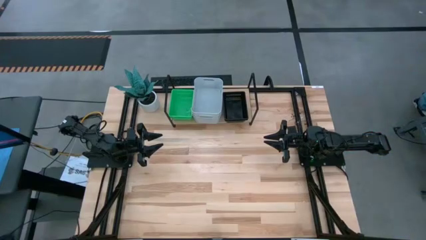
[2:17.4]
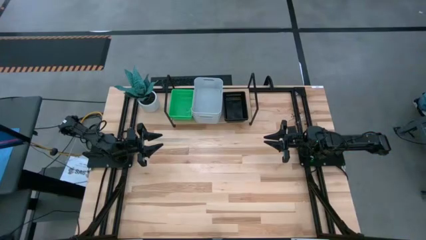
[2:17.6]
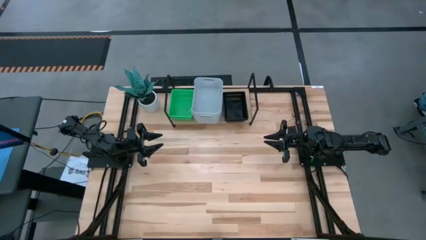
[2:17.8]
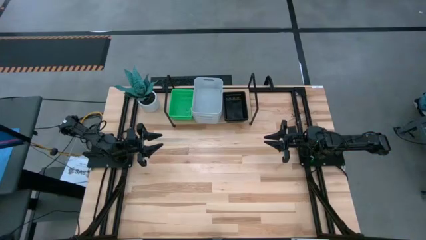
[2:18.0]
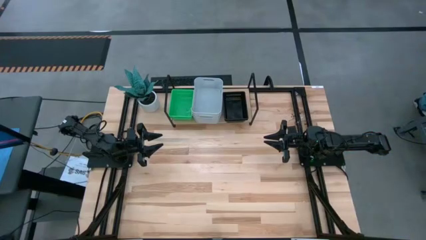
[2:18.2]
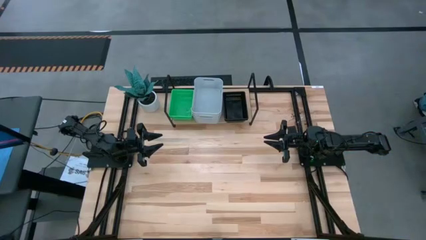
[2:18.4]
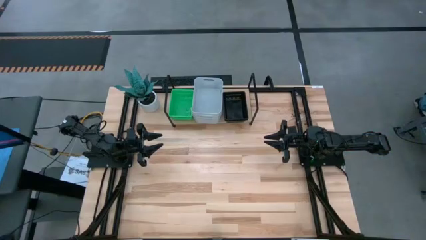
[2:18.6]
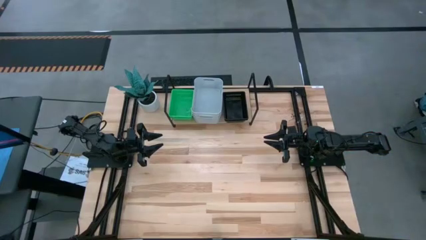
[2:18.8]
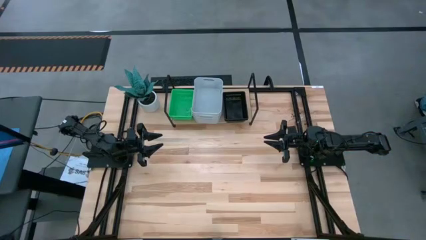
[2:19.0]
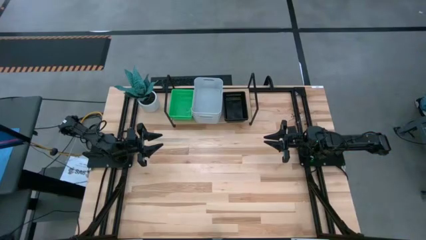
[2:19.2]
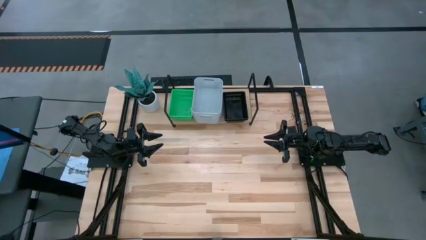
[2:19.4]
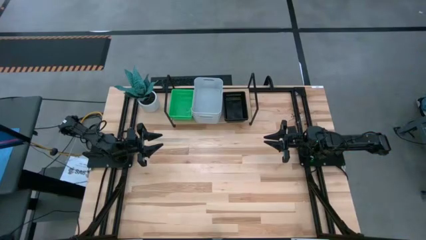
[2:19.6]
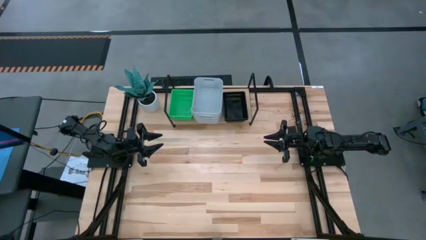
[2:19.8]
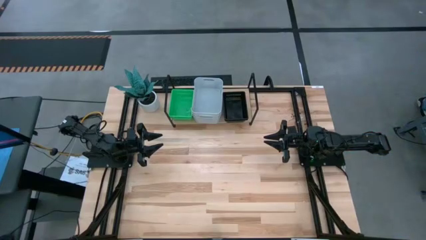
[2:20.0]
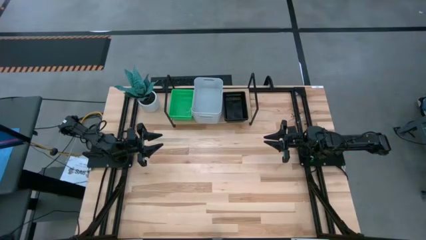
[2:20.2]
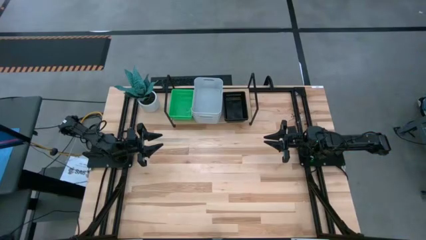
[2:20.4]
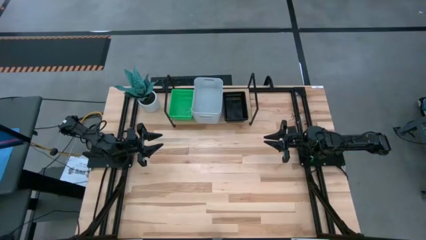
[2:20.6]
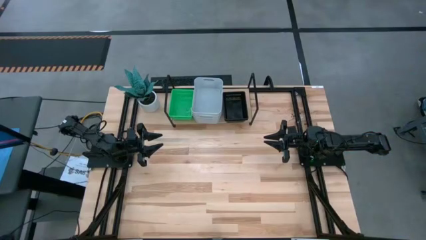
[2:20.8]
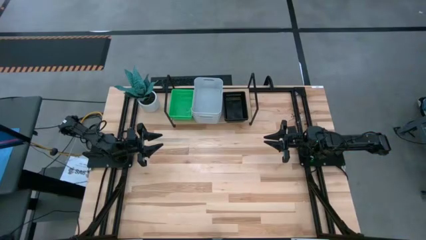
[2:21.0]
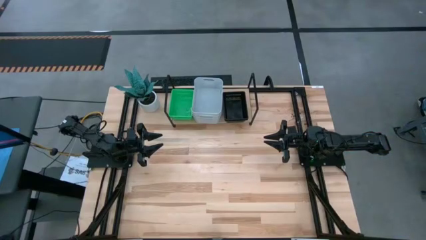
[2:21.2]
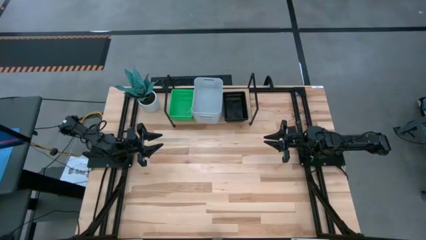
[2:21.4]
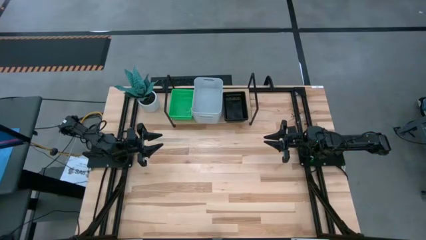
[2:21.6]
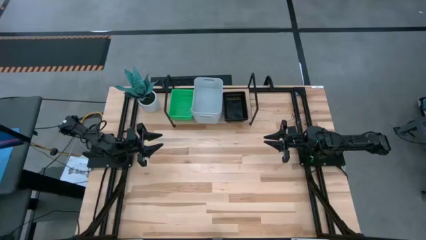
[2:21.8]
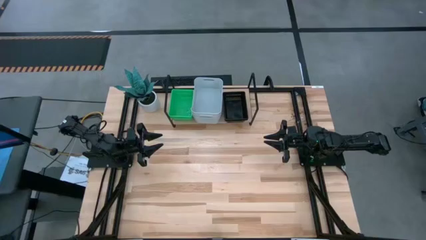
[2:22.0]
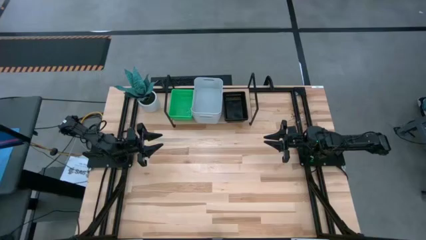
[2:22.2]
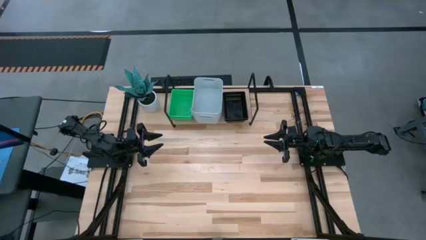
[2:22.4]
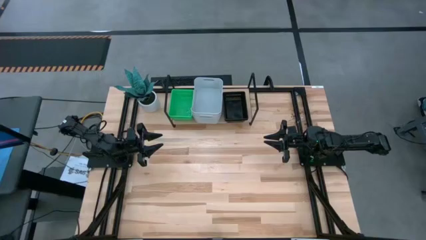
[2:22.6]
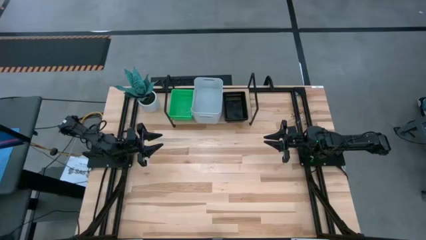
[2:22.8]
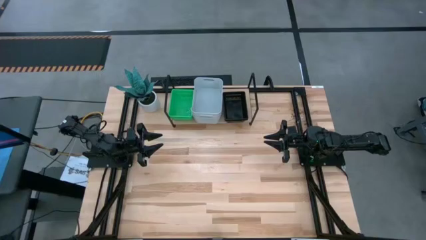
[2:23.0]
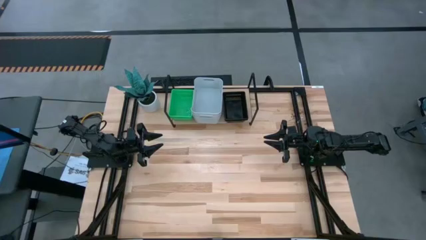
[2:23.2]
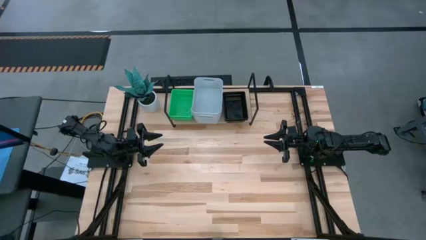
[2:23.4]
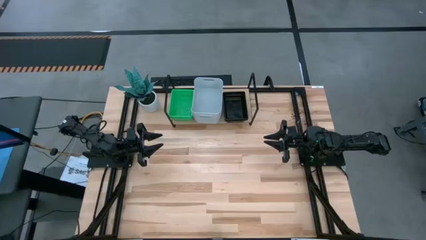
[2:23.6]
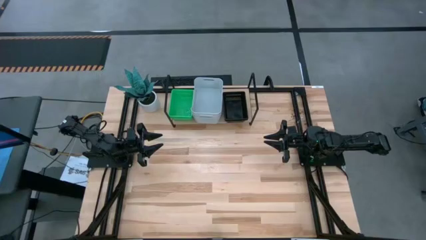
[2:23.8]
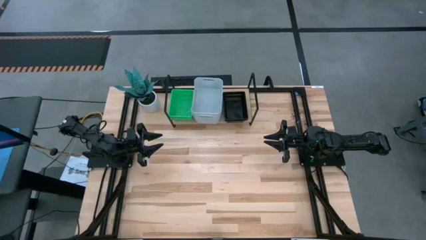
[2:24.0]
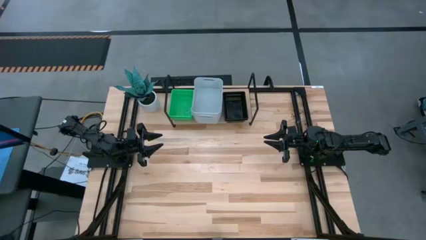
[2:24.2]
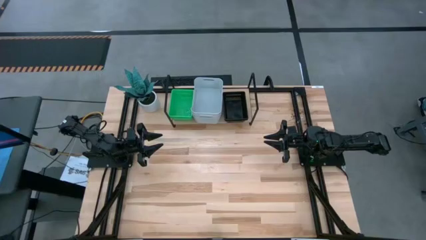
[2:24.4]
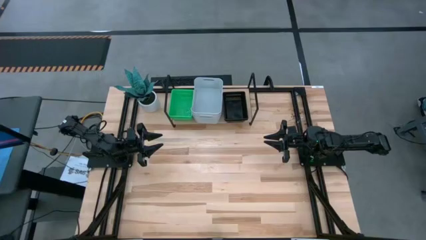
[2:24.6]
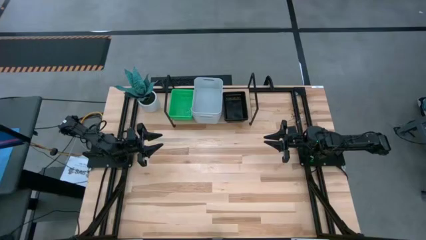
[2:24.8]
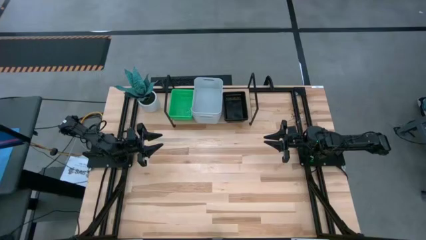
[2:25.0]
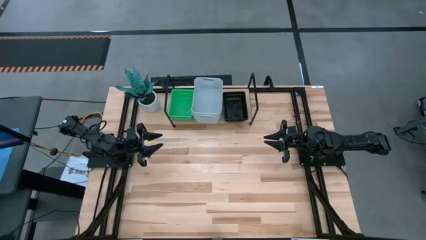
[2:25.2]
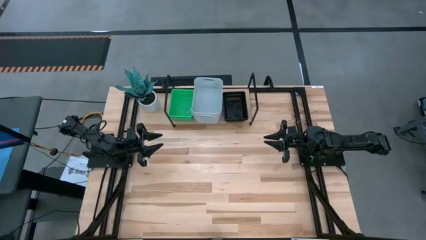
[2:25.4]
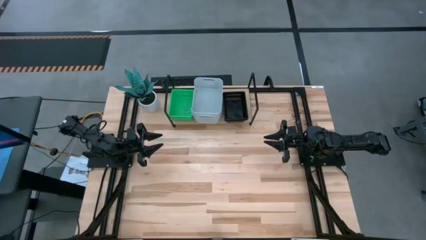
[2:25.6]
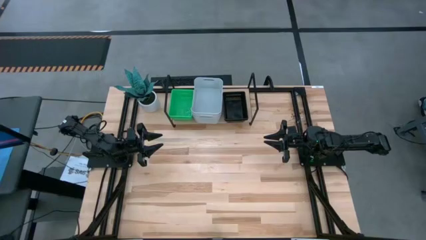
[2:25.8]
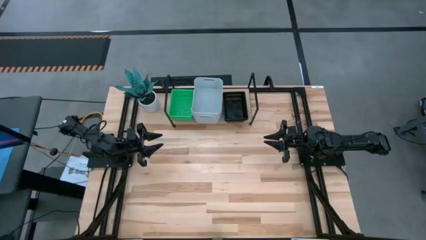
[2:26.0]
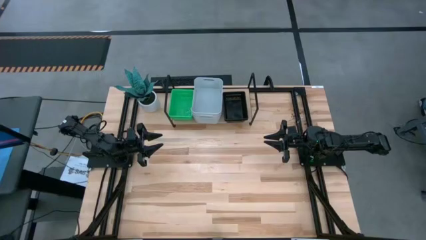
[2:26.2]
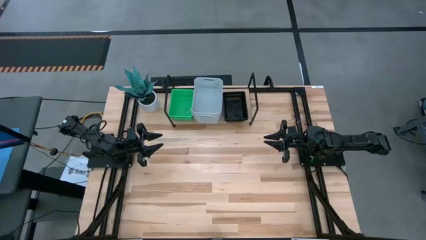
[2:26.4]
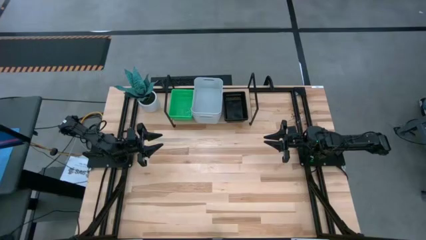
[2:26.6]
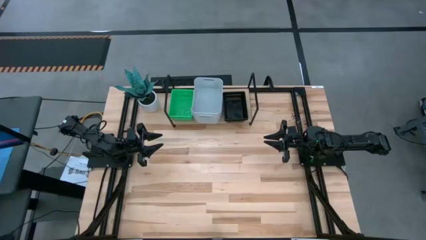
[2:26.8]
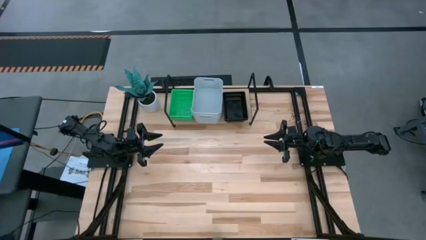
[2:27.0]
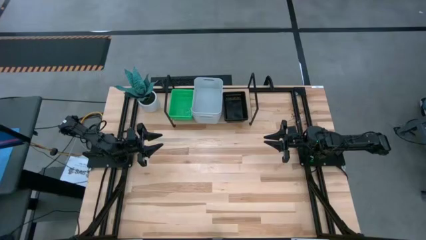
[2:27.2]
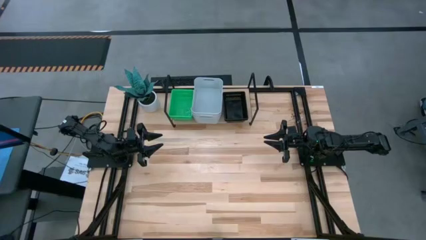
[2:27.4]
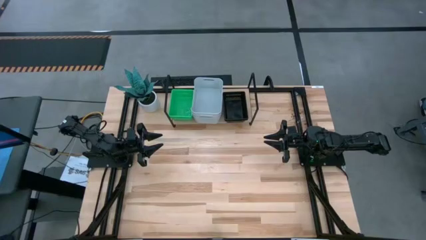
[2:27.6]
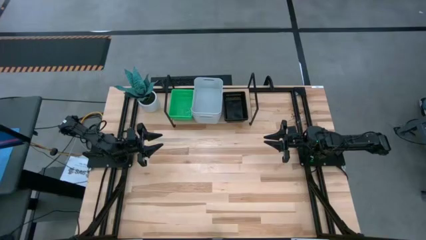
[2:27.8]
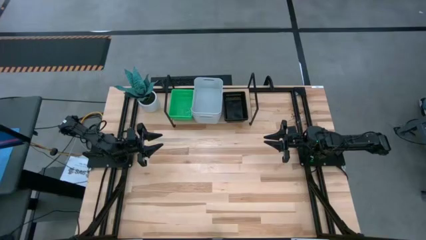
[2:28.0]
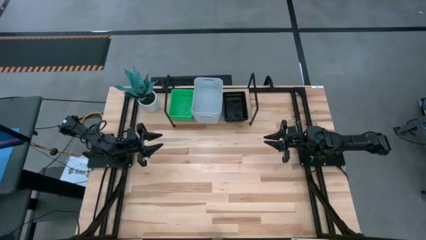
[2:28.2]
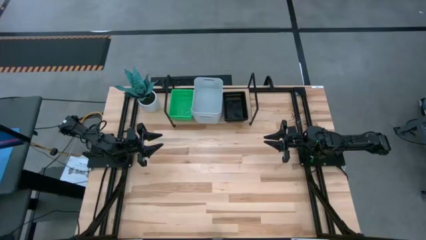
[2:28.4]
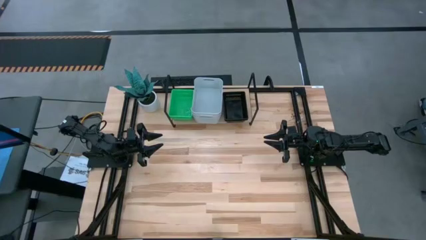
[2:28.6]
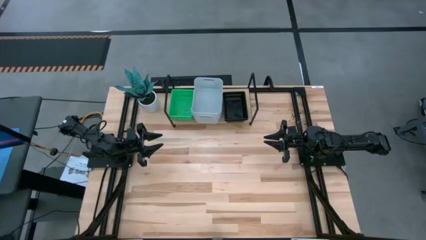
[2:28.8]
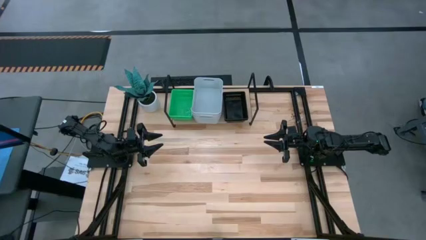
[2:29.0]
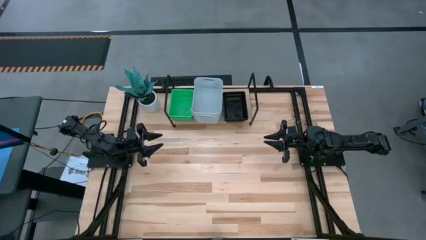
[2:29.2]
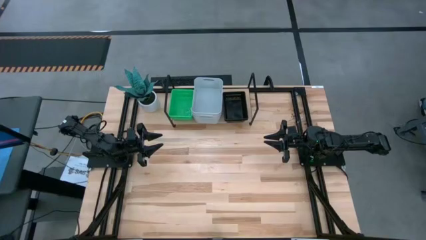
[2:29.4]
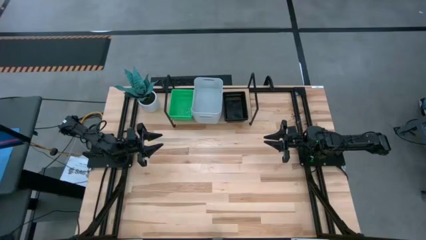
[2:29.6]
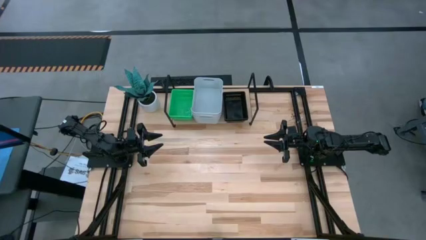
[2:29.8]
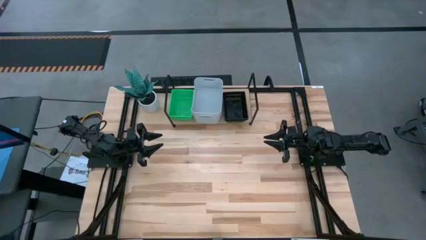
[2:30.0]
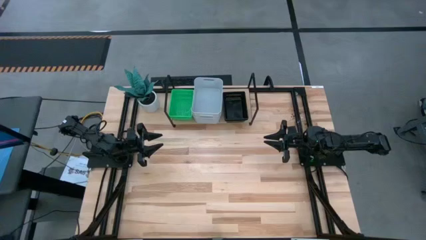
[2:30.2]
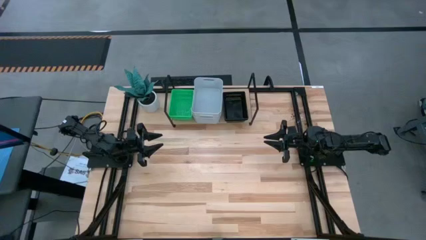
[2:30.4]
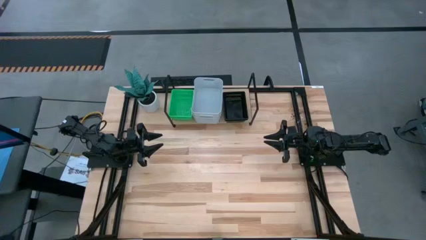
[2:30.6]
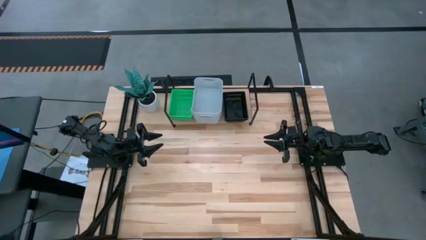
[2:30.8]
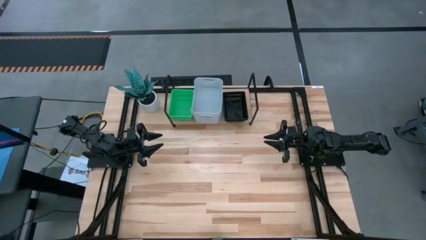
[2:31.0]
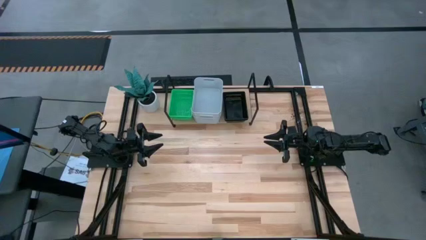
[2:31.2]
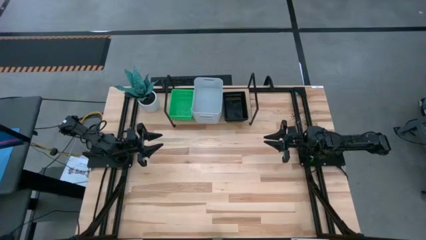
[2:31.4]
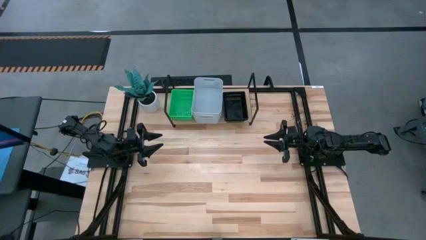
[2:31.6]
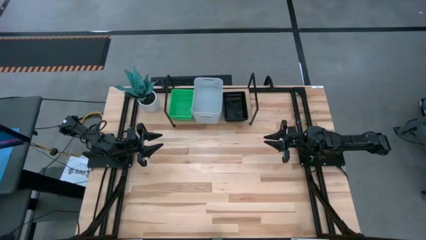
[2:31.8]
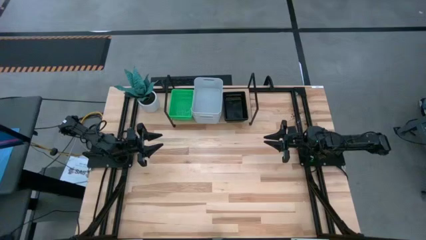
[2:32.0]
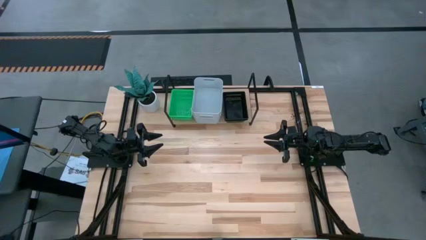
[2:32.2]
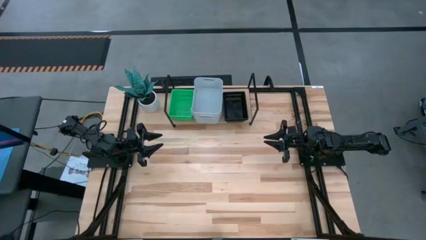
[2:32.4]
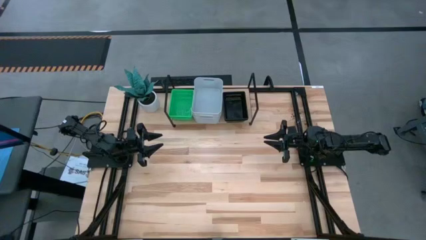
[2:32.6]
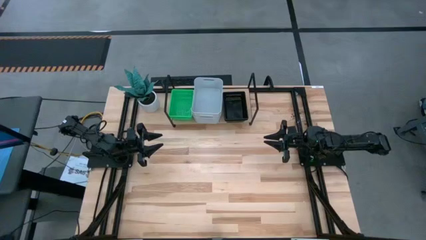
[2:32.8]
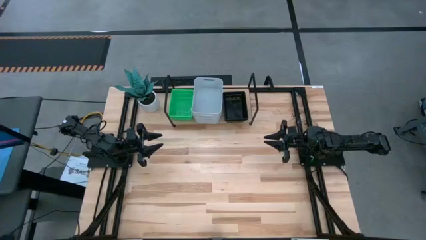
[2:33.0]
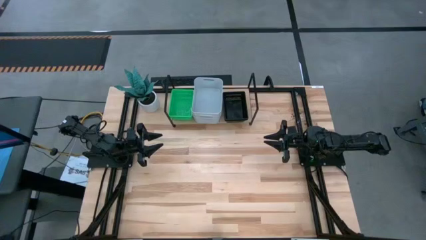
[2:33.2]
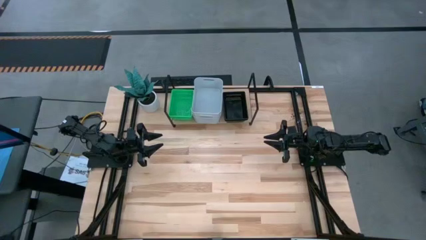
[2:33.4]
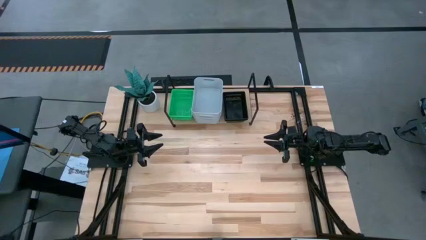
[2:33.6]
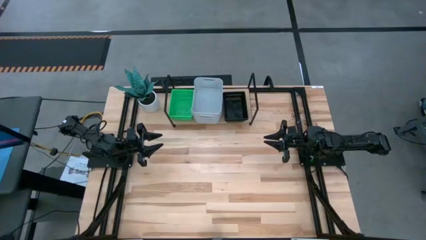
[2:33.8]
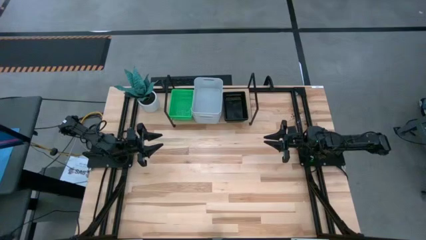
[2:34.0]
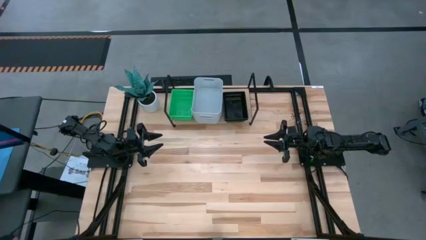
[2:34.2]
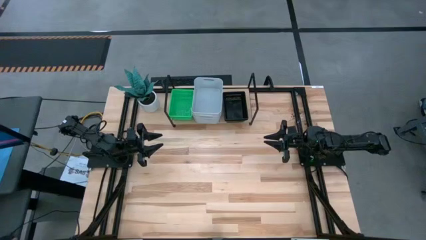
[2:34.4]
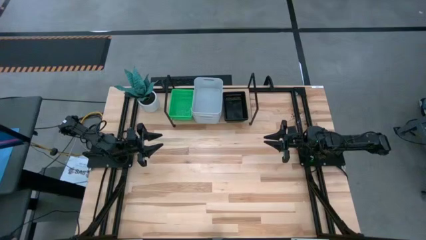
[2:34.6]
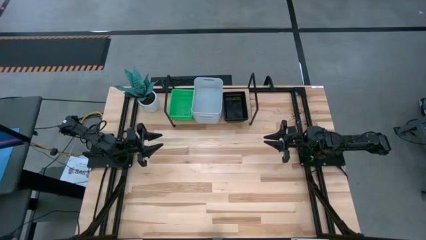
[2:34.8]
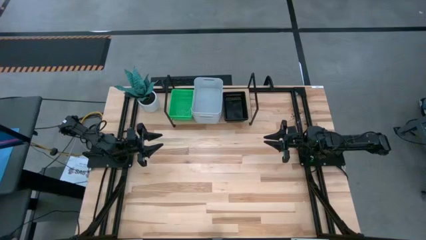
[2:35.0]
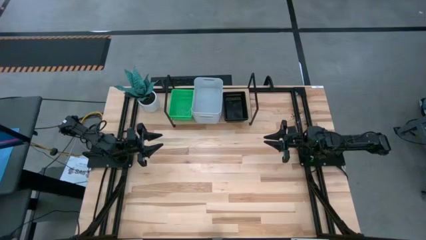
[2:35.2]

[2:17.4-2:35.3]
Task: Stack baskets on shelf by color
Return to Home Position
